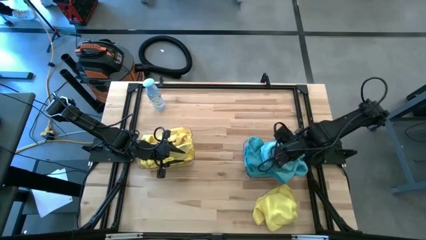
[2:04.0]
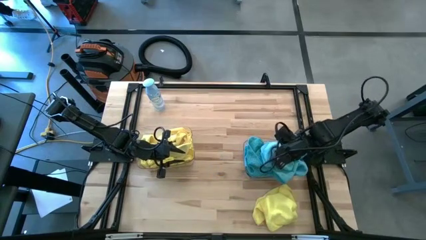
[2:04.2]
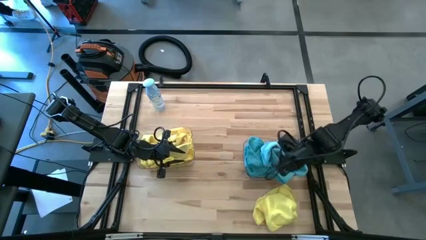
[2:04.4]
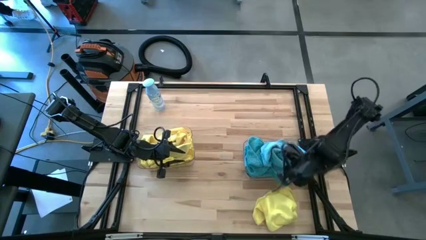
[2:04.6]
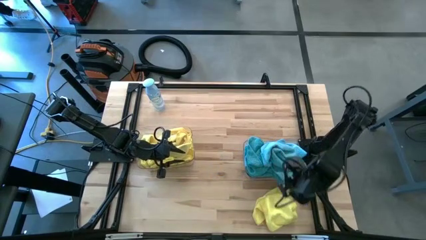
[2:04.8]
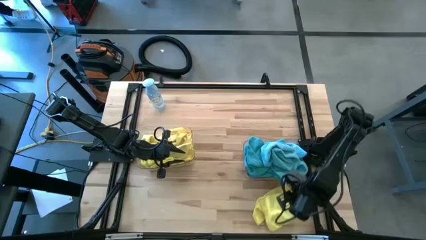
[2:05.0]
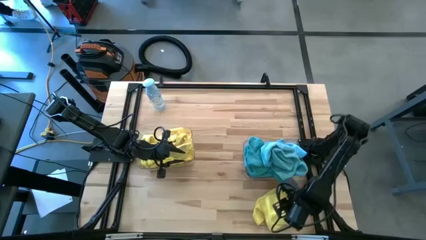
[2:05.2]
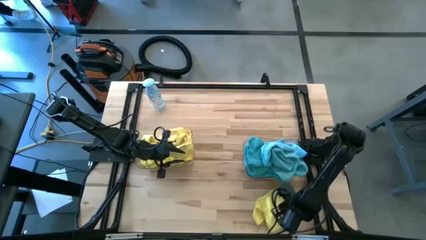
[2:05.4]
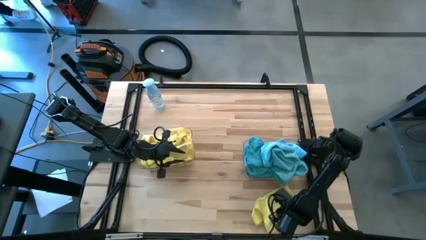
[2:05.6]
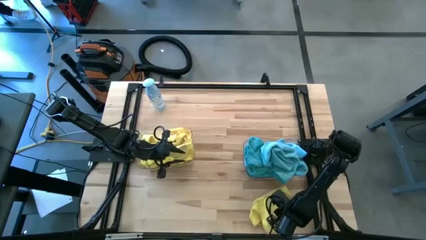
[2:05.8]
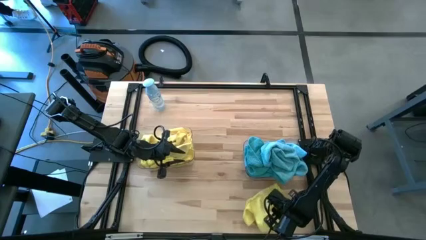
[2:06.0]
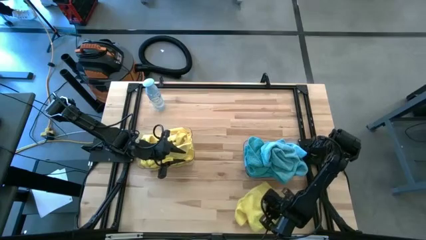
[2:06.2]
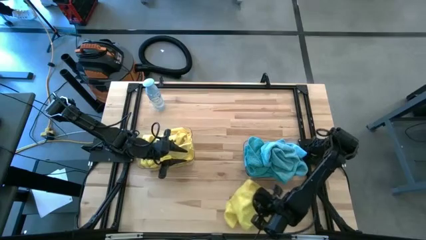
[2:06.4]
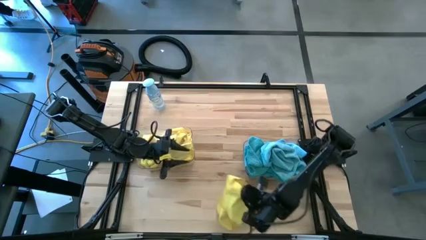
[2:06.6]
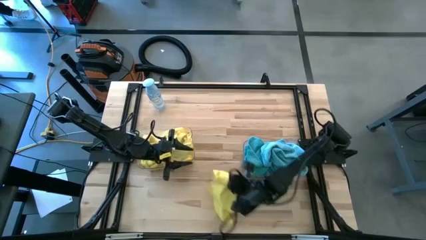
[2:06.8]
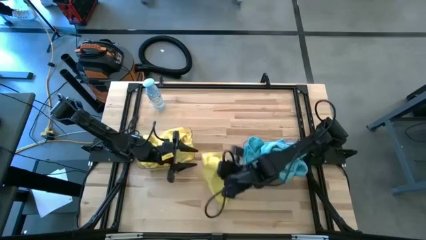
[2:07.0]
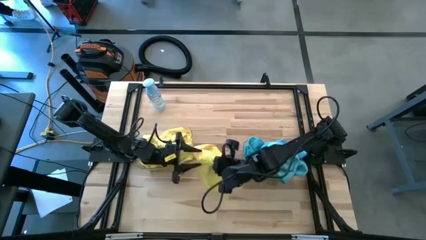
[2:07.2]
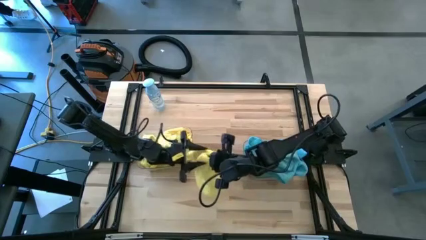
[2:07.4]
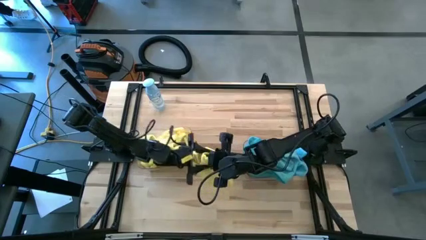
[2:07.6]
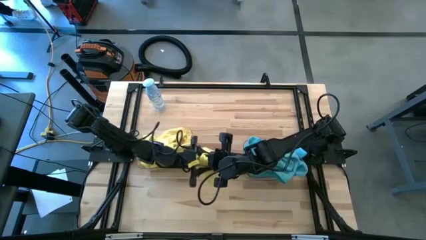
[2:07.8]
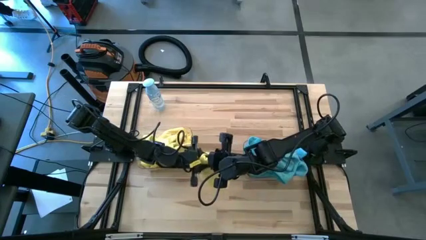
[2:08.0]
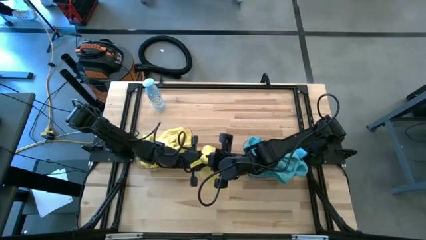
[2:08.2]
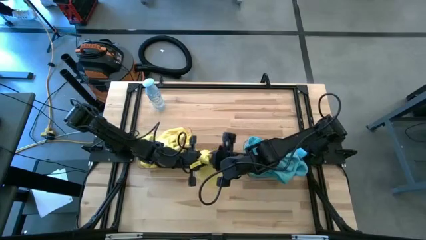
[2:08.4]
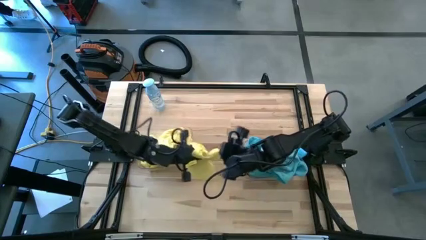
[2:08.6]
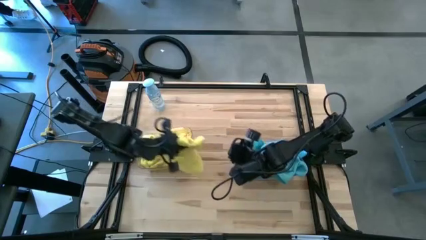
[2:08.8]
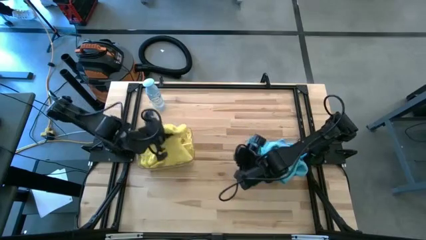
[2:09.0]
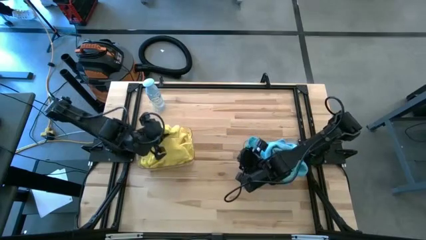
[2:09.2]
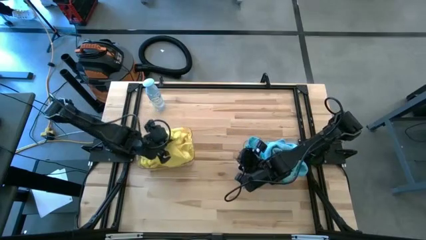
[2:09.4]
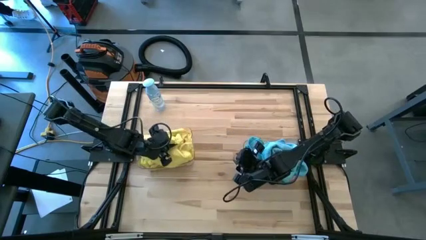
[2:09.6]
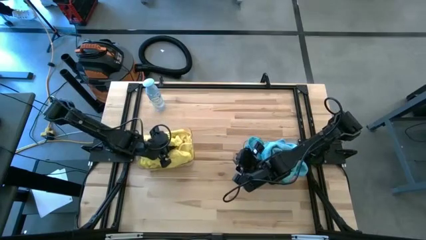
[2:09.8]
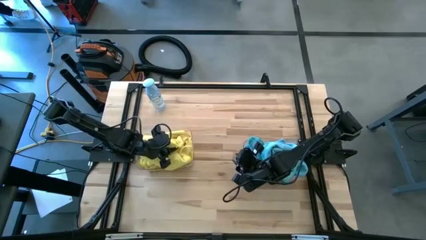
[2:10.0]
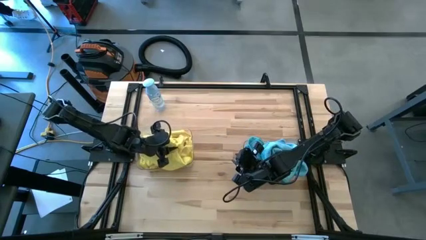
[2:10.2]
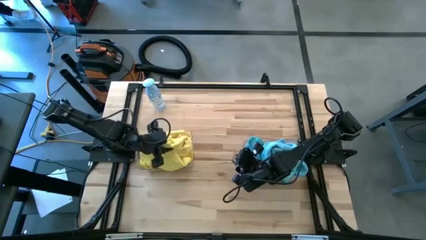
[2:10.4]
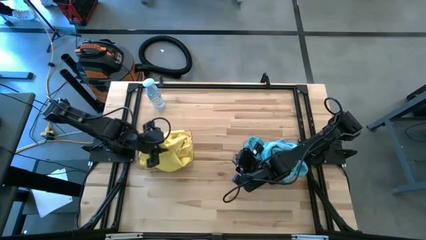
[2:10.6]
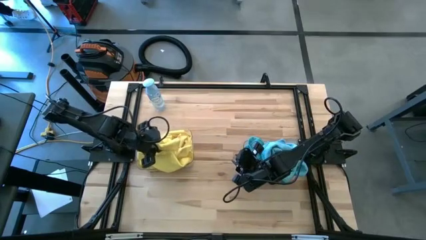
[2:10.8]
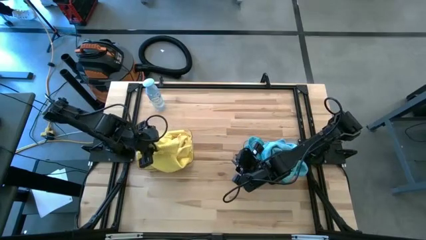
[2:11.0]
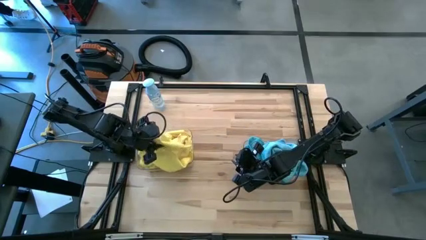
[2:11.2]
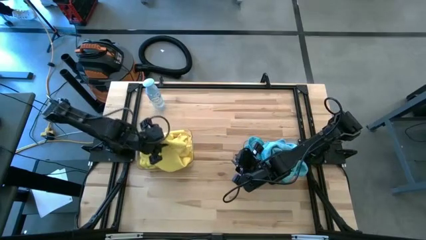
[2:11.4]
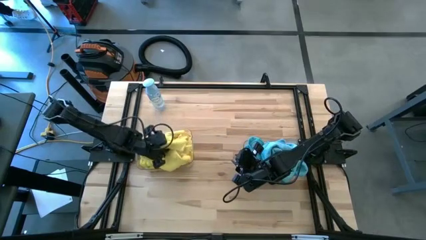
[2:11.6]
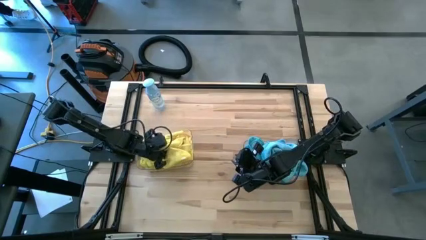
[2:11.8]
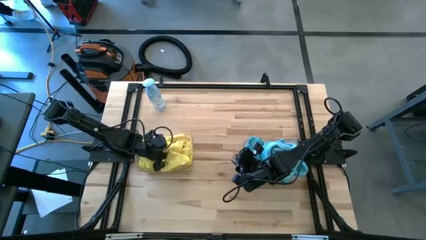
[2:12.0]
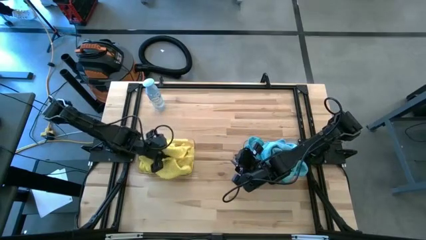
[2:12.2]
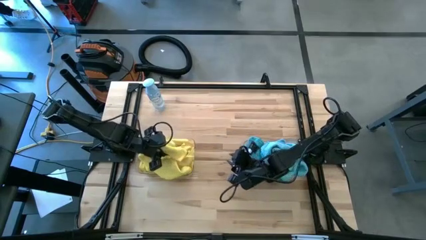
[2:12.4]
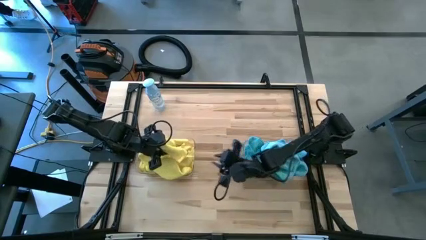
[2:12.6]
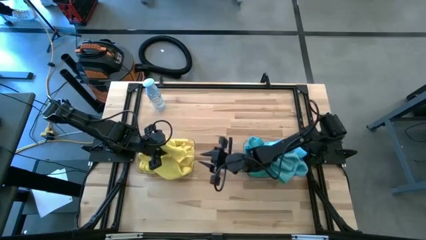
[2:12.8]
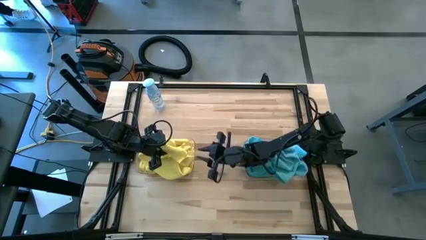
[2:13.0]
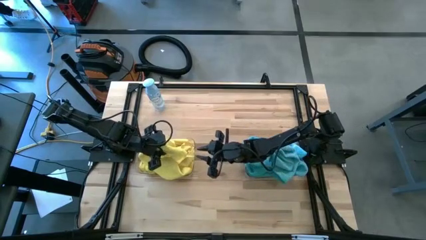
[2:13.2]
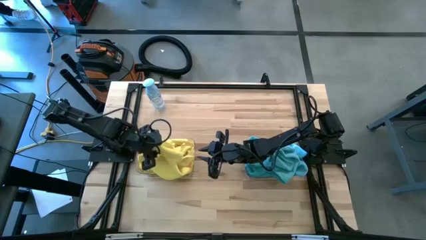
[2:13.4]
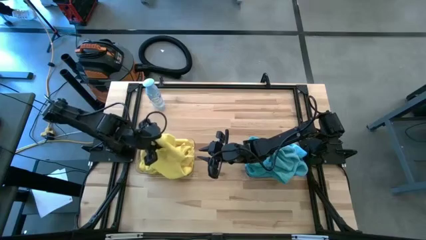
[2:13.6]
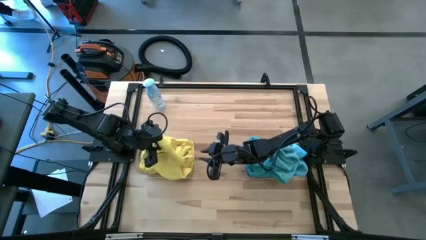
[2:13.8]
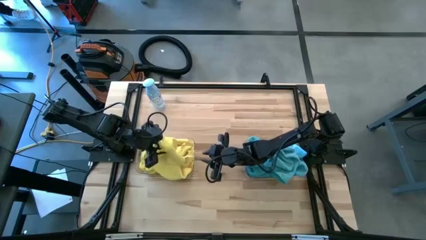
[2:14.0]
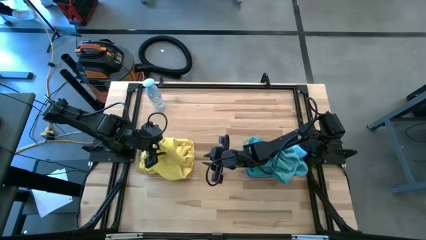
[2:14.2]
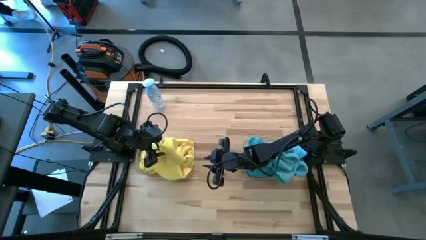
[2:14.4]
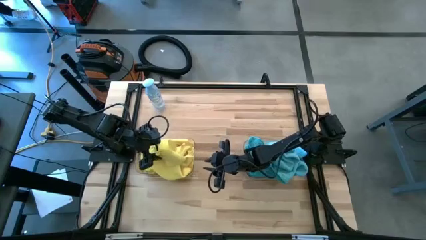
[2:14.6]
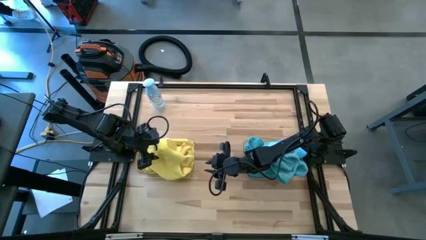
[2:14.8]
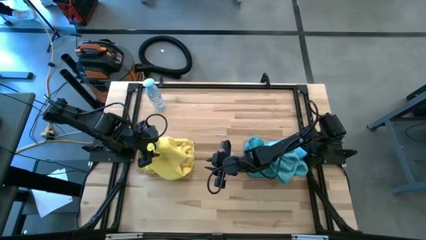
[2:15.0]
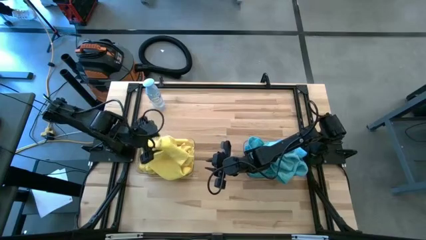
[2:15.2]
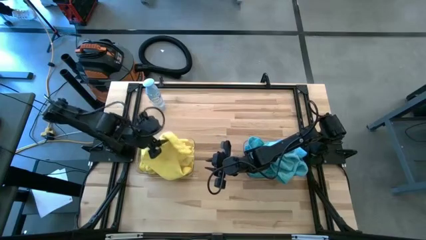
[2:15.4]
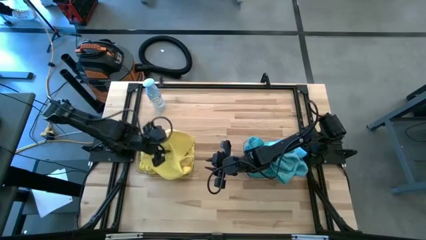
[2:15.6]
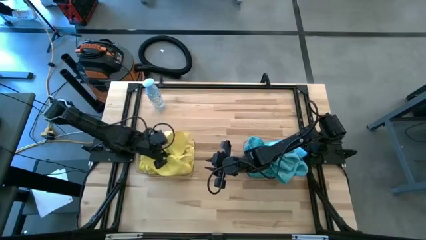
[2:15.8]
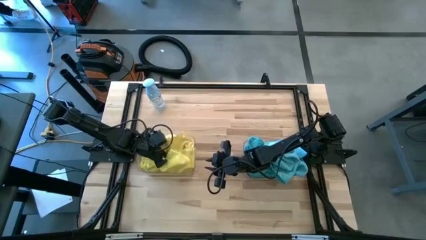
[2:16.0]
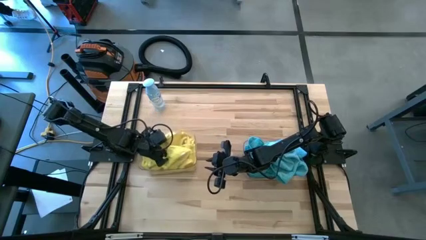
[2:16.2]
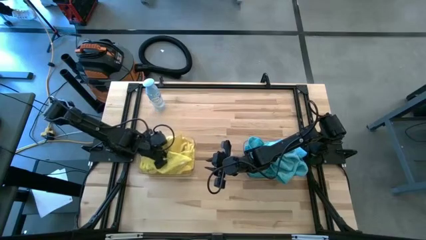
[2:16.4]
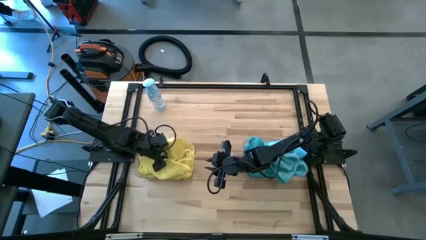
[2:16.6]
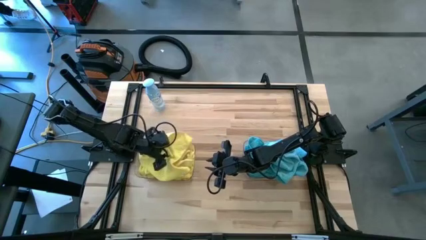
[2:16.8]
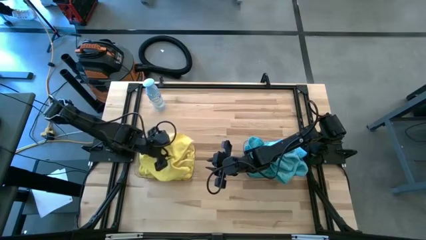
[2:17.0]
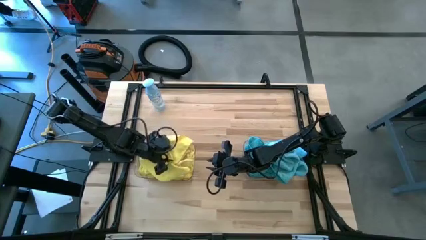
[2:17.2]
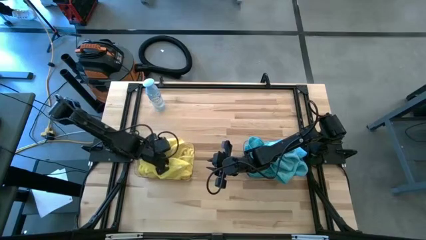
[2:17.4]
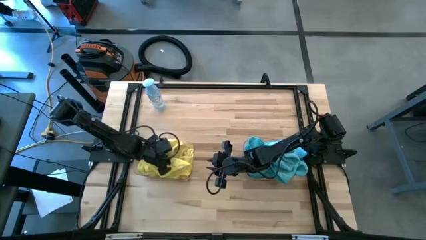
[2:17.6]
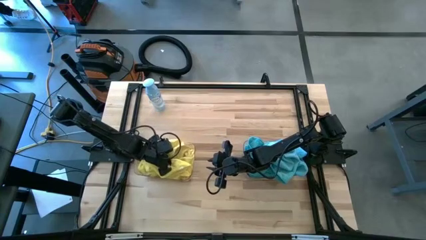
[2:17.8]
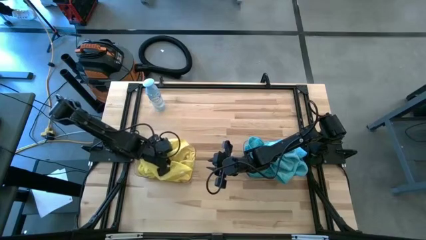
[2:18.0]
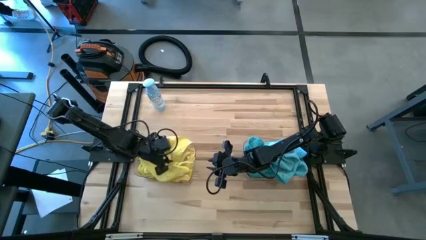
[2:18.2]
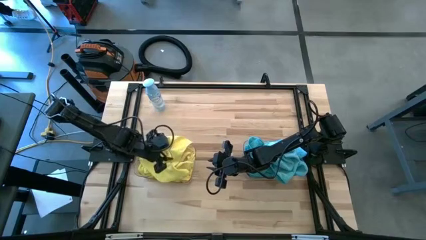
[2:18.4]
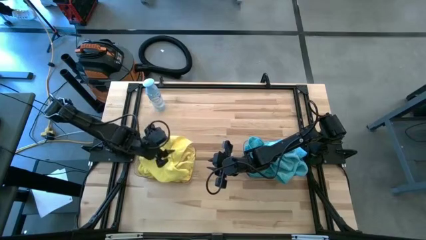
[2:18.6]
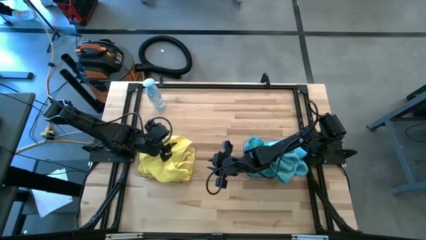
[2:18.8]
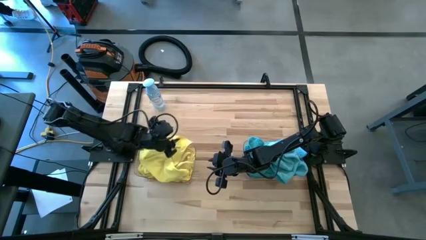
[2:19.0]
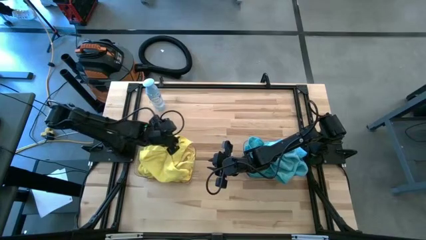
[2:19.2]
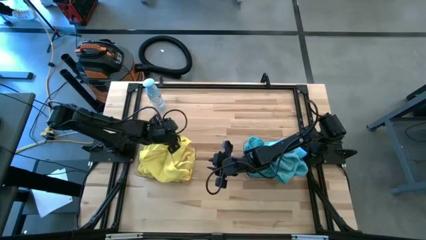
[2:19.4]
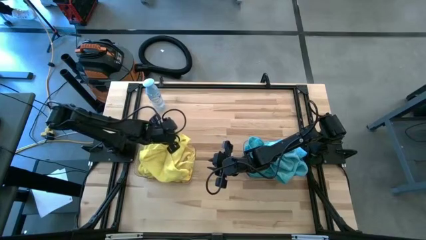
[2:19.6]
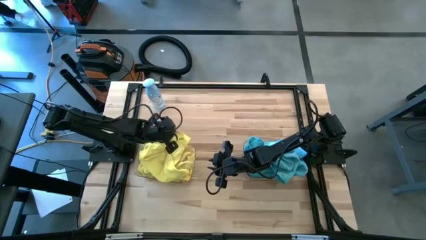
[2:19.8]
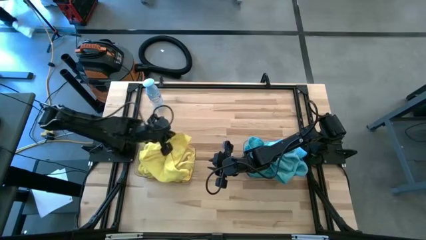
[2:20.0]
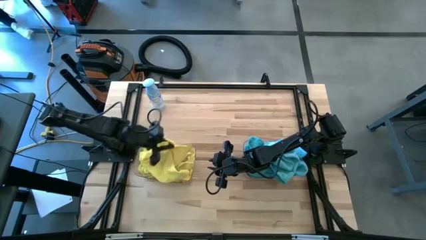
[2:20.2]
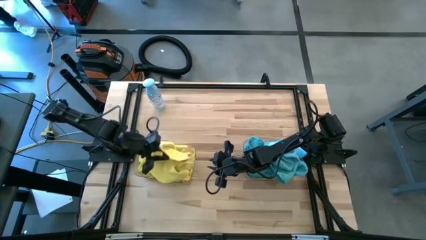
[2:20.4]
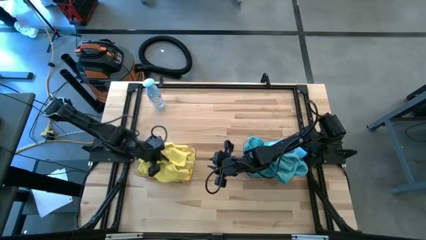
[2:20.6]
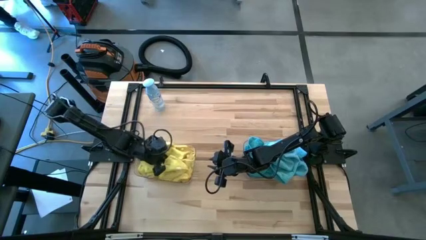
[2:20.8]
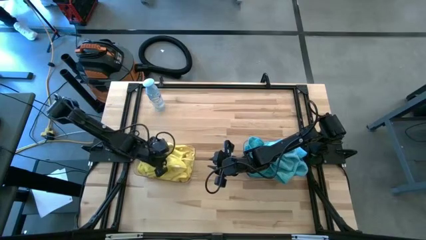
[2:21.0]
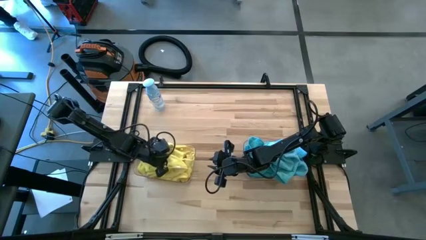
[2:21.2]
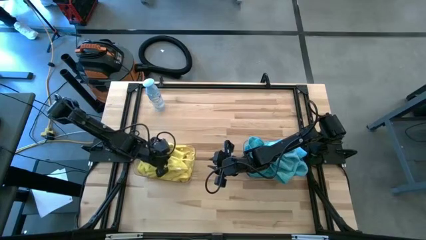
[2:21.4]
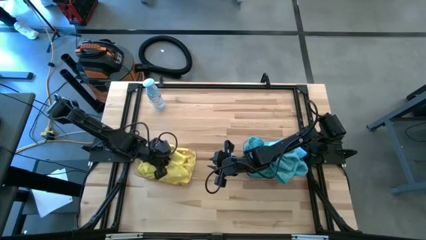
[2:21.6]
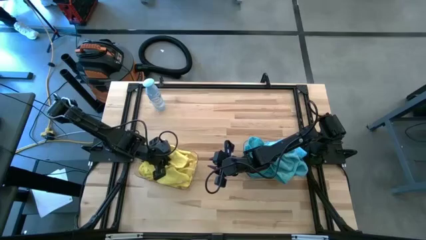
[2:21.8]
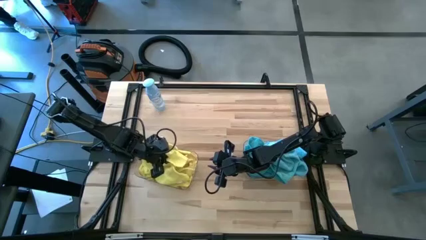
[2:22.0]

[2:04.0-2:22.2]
Task: Sort microfiber towel by color & place in baskets
Put the yellow microfiber cloth into the left transparent bin
